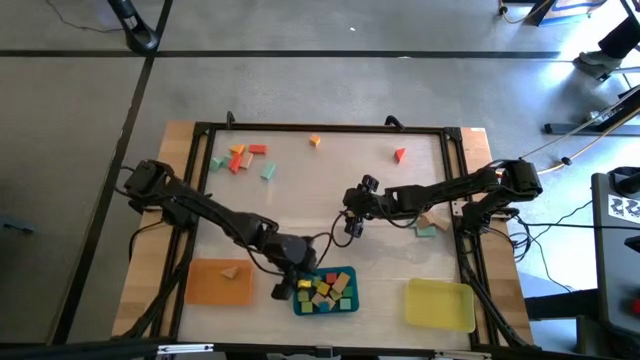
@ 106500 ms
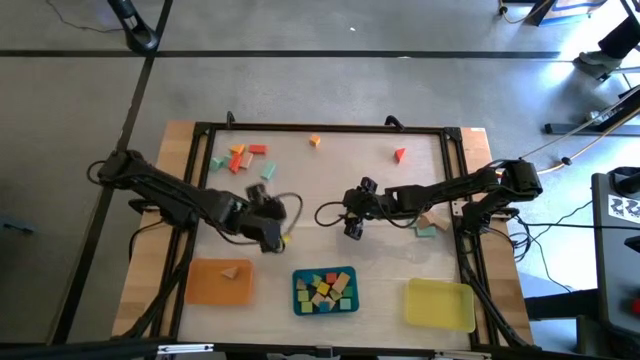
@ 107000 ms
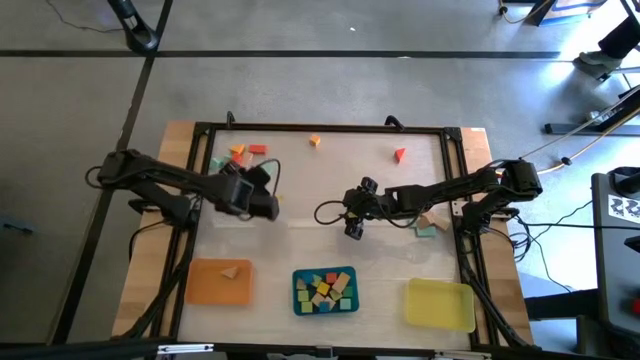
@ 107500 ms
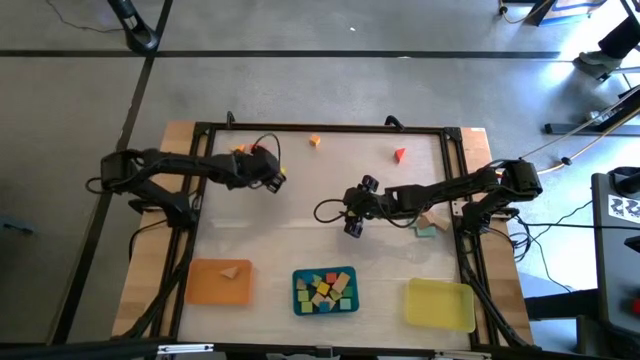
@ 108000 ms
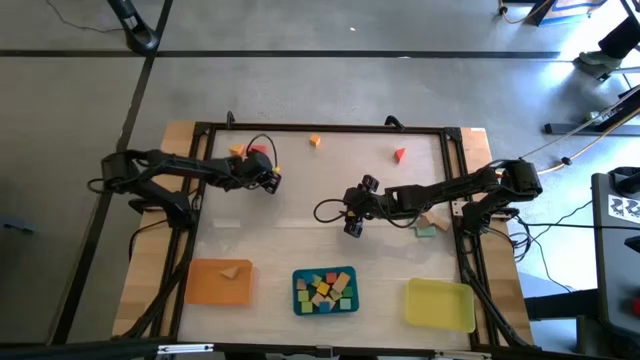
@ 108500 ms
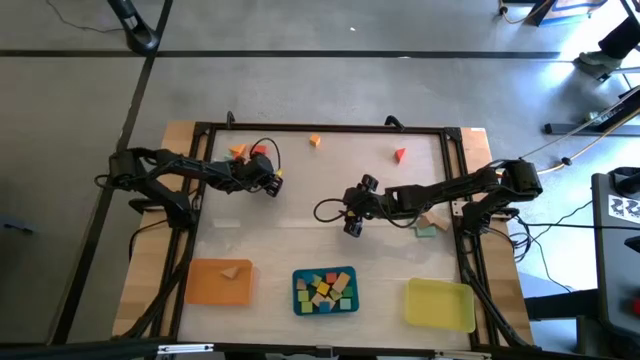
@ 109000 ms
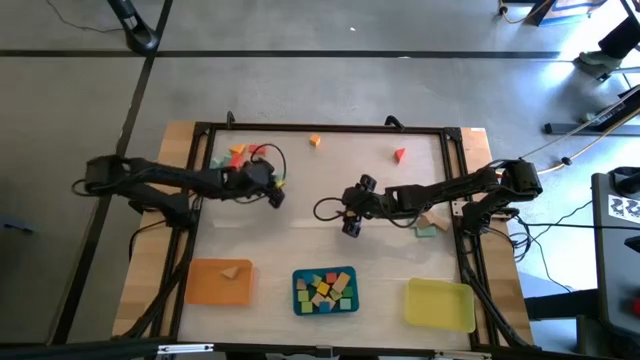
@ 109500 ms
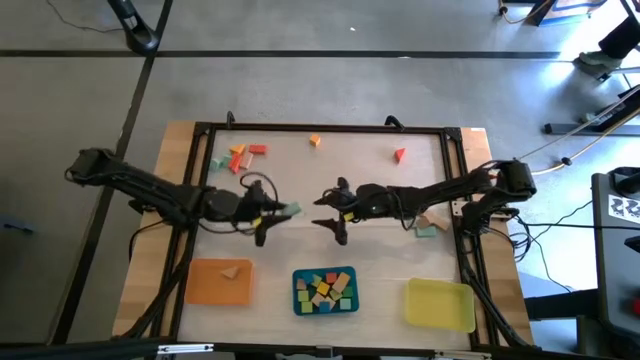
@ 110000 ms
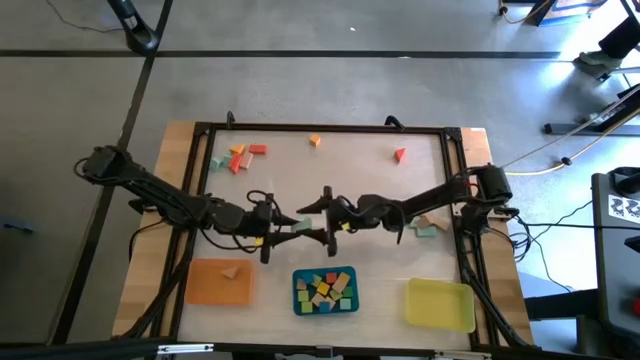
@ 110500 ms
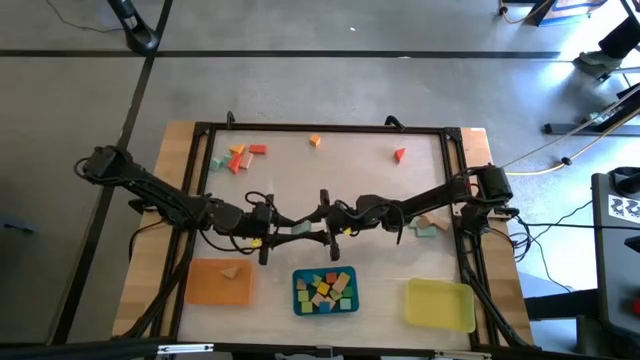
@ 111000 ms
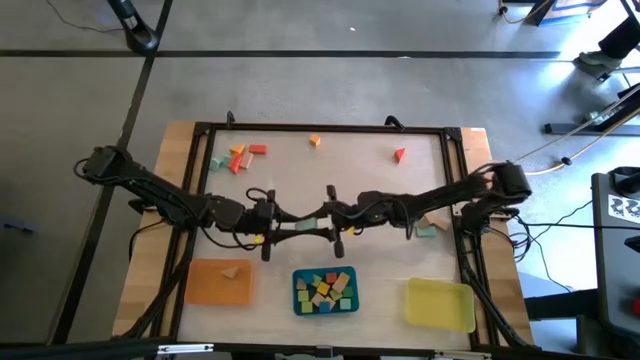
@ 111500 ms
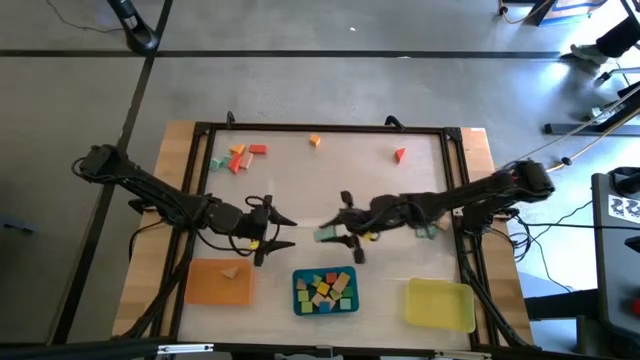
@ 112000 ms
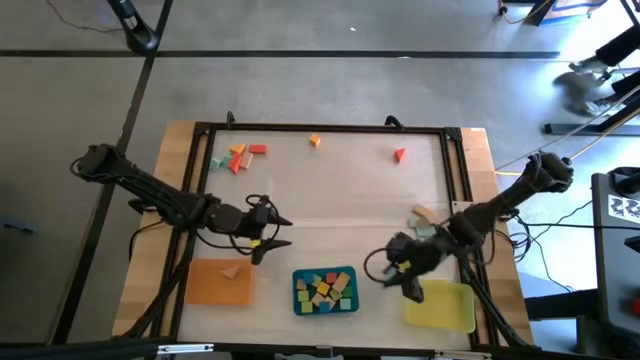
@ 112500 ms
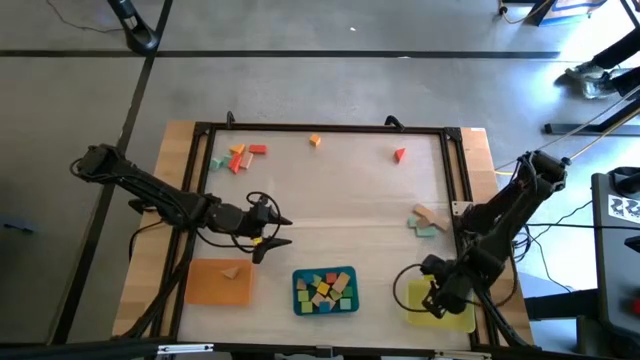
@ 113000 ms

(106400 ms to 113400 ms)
Task: Sort blocks by size
Put the light blue rectangular block into the yellow bin

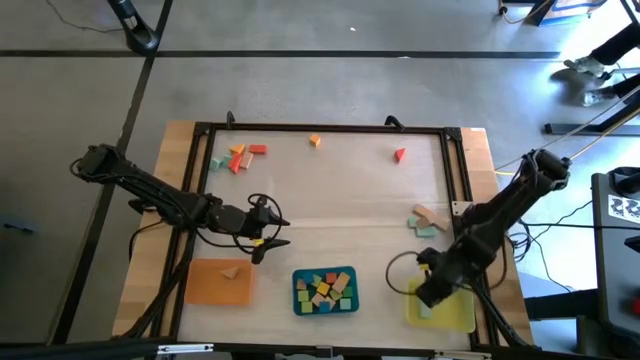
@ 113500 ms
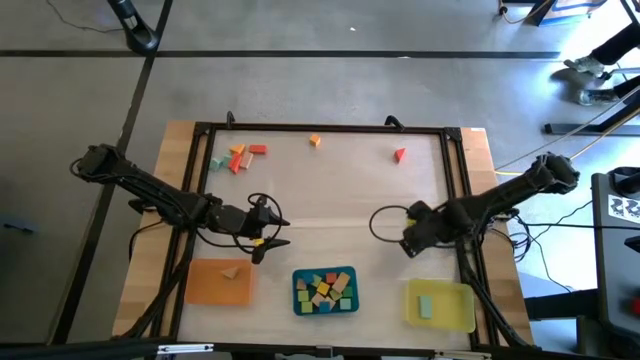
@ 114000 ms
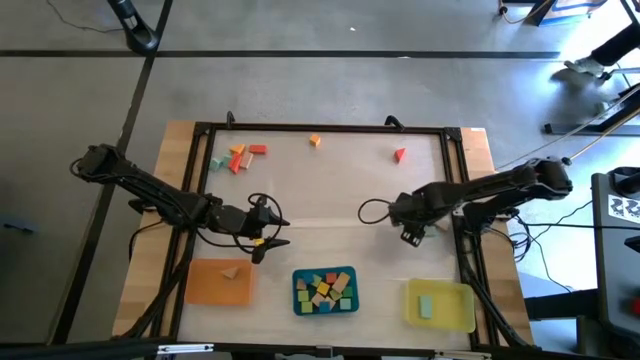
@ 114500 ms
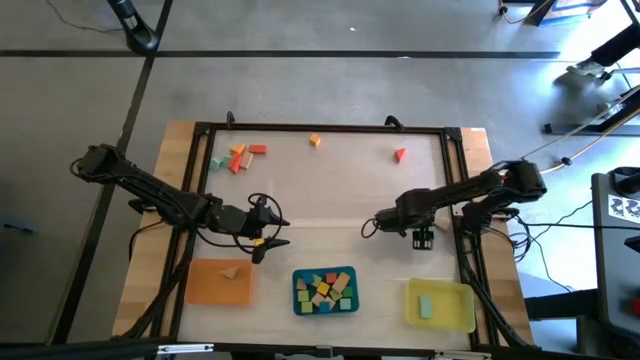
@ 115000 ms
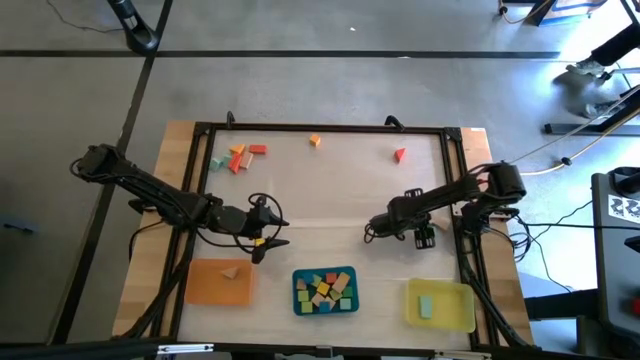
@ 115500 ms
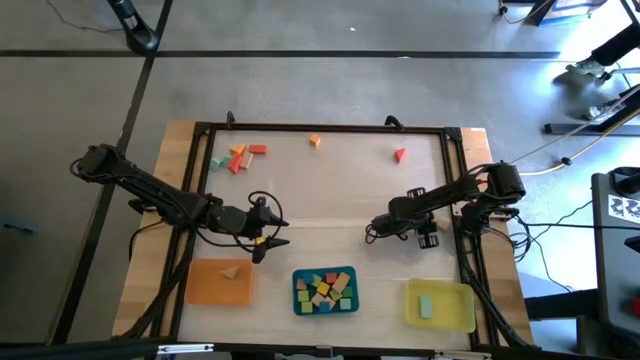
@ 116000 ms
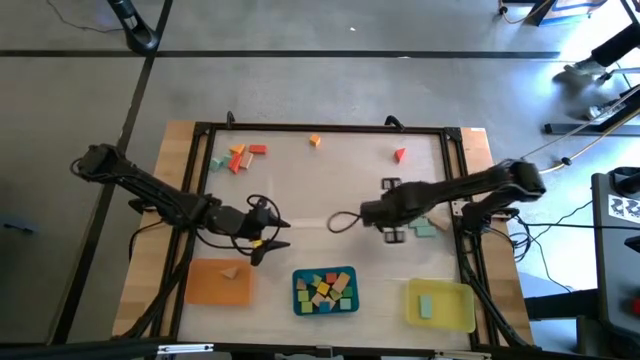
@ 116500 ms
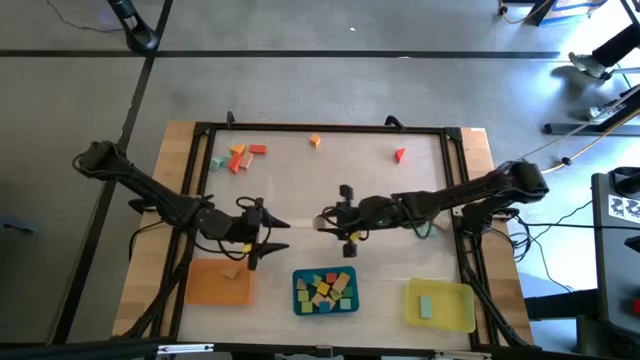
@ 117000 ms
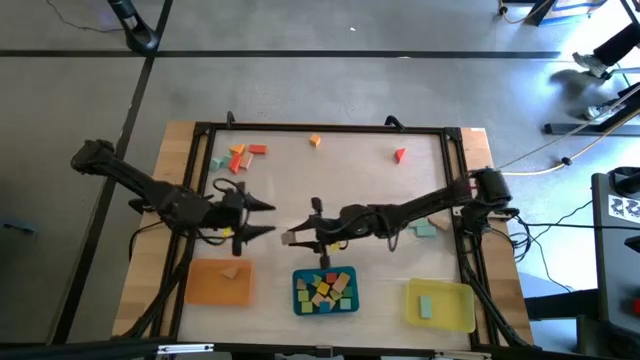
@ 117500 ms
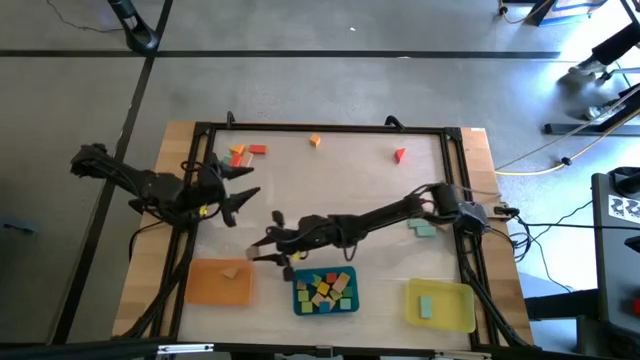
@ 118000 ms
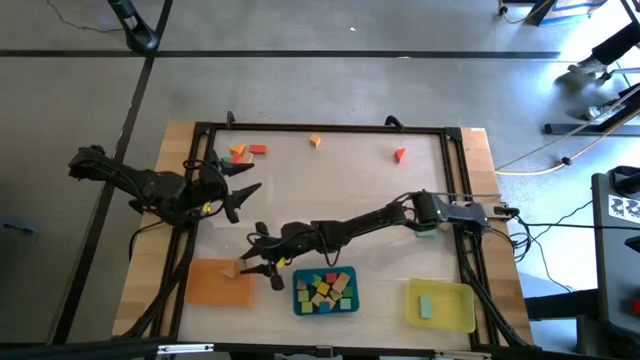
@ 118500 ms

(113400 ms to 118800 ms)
Put the brown triangular block into the orange bin

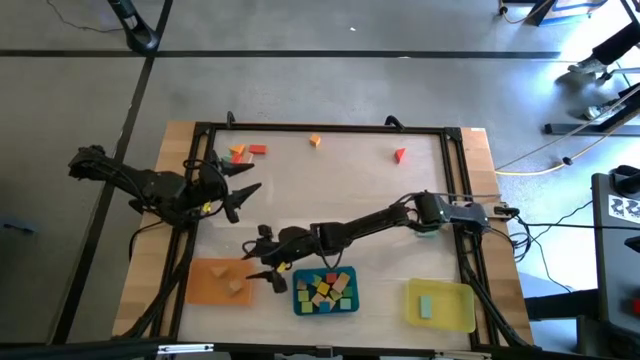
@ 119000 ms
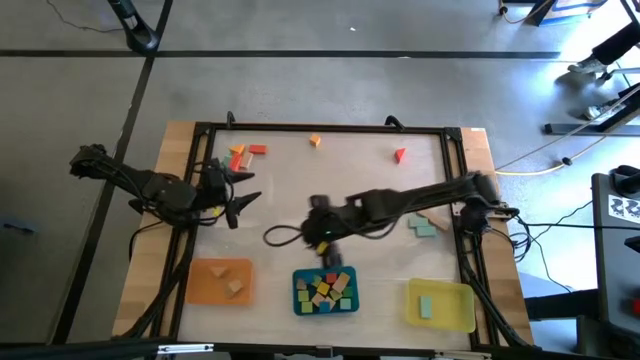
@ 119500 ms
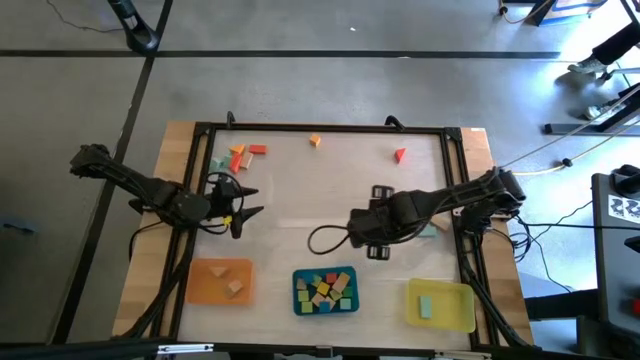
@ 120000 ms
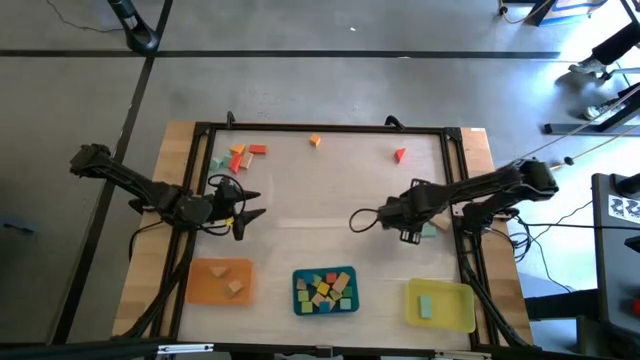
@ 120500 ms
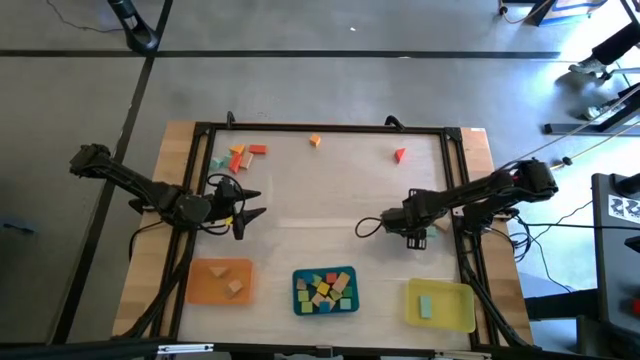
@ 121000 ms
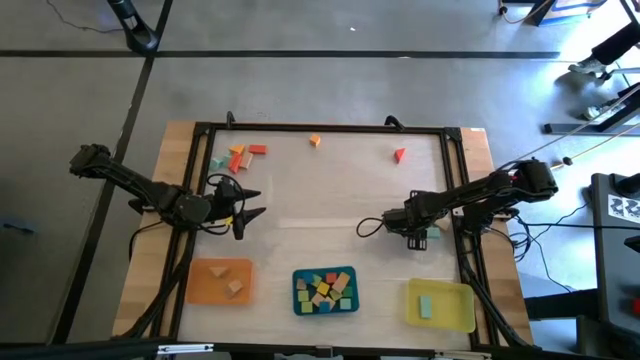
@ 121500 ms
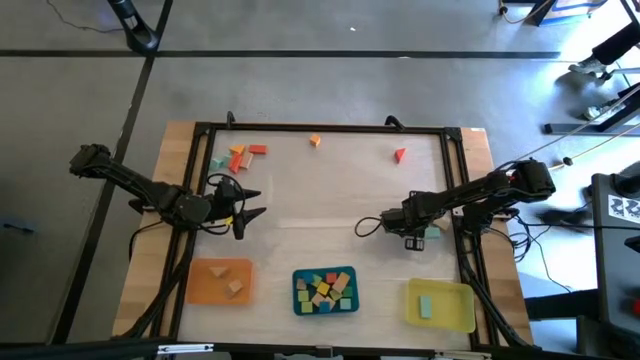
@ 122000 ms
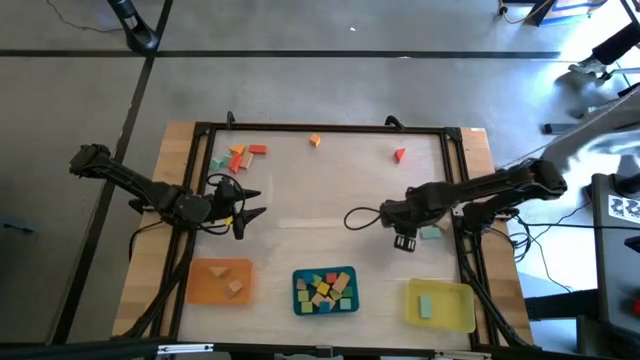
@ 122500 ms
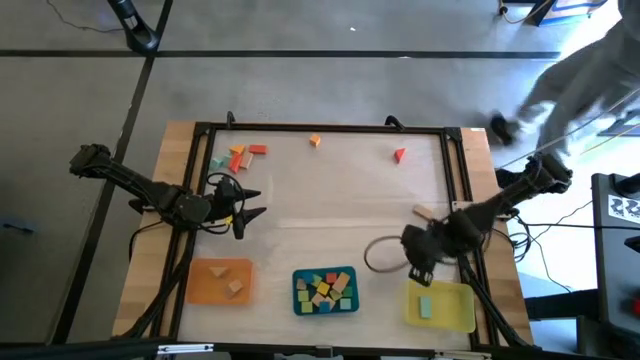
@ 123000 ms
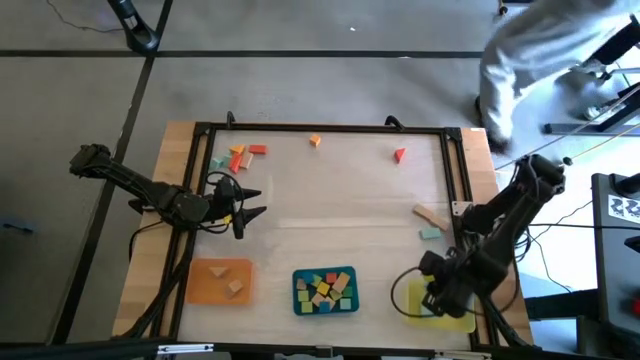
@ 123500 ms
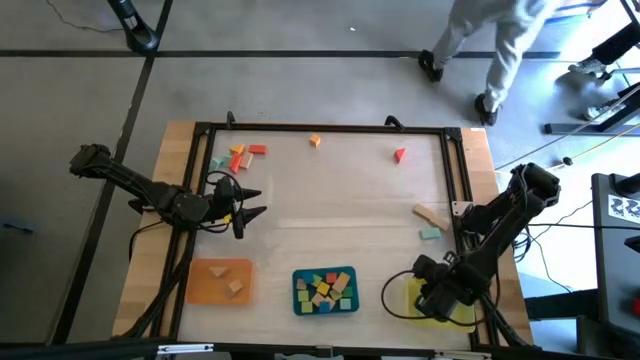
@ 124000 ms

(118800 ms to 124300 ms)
Put the light blue rectangular block into the yellow bin

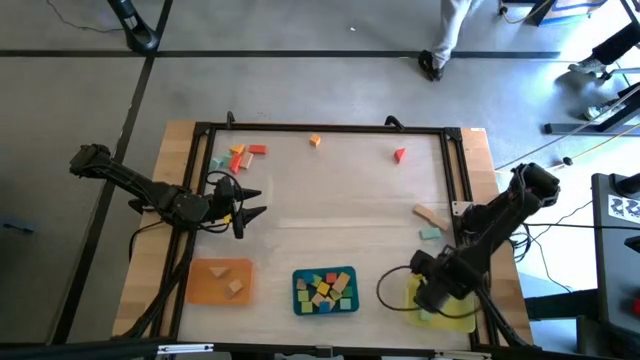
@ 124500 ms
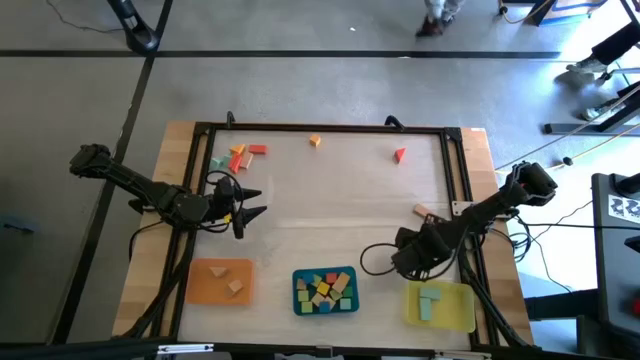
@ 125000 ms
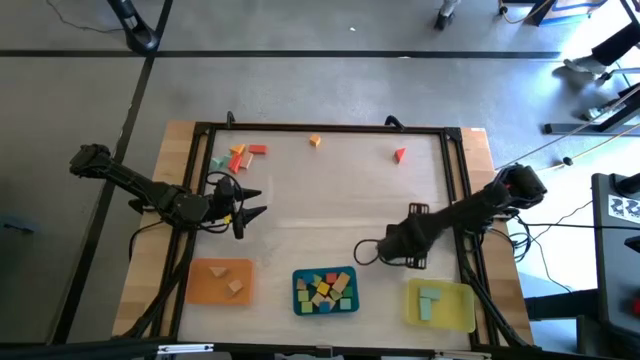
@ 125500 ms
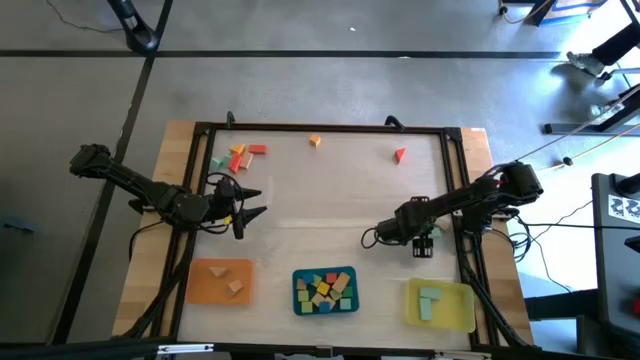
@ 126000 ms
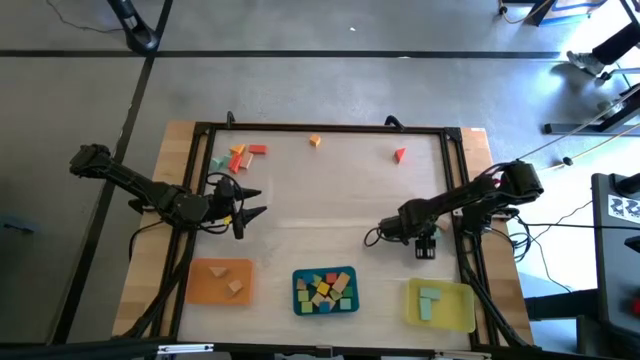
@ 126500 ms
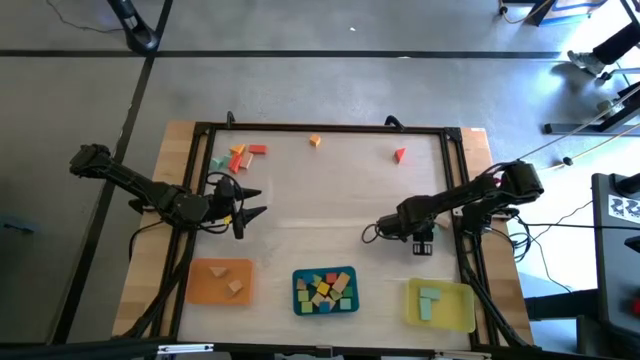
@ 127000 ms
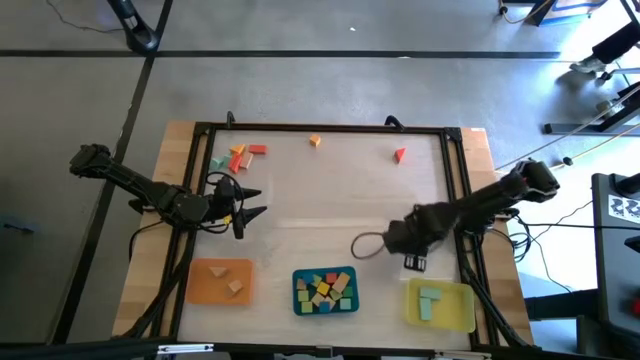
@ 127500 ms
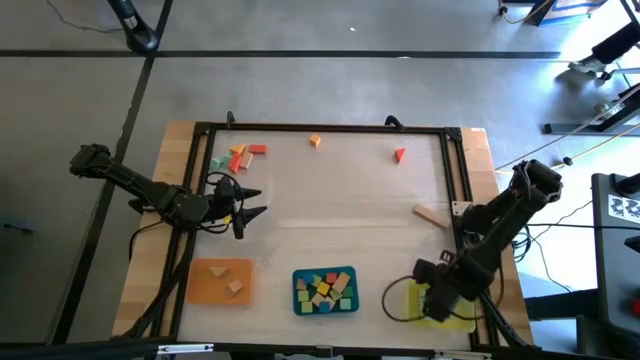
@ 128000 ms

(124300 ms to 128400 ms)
Put the light blue rectangular block into the yellow bin
